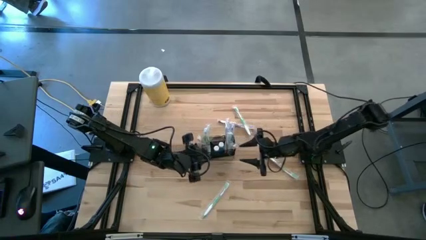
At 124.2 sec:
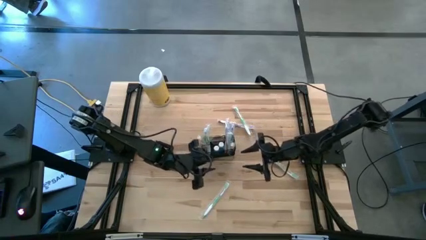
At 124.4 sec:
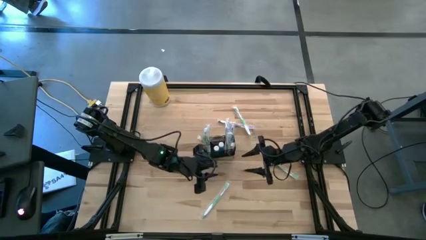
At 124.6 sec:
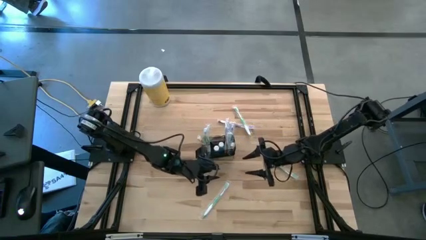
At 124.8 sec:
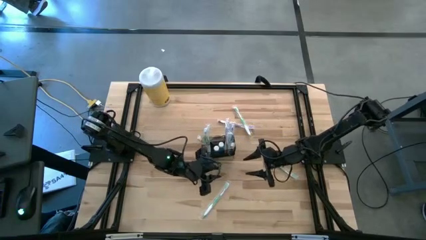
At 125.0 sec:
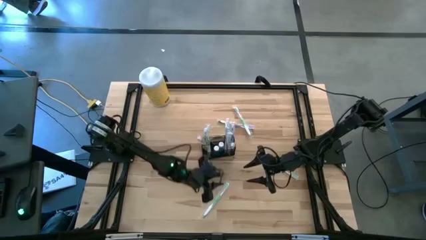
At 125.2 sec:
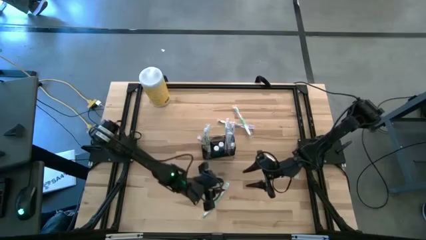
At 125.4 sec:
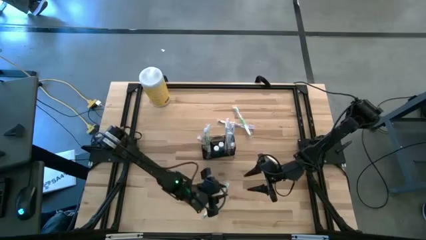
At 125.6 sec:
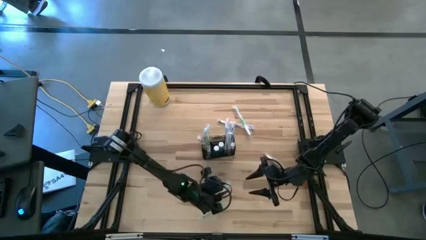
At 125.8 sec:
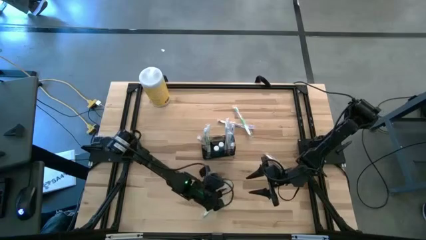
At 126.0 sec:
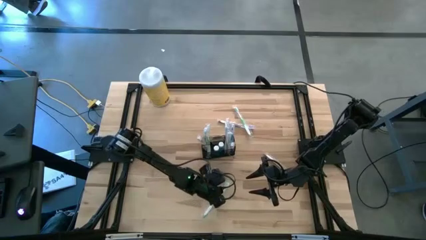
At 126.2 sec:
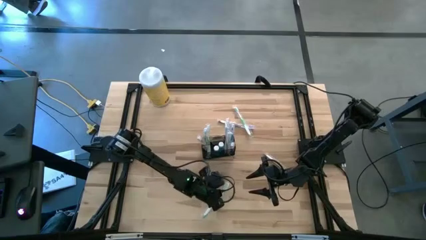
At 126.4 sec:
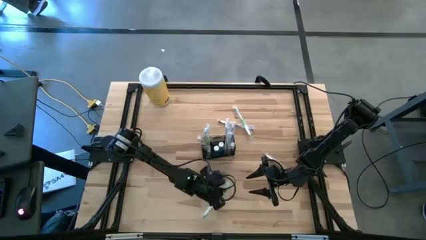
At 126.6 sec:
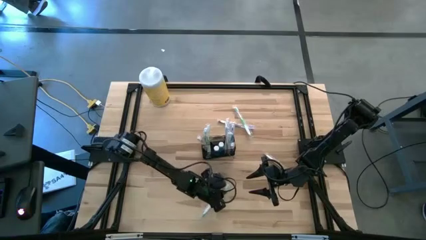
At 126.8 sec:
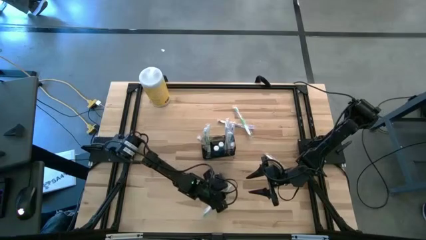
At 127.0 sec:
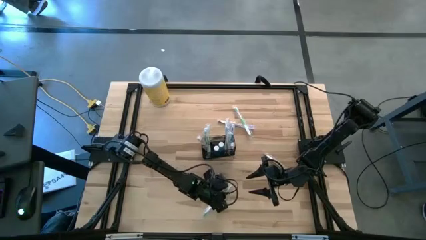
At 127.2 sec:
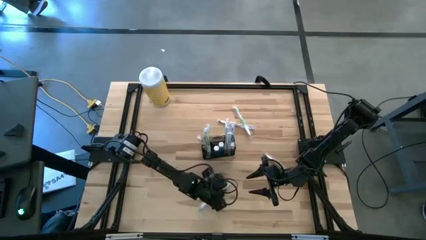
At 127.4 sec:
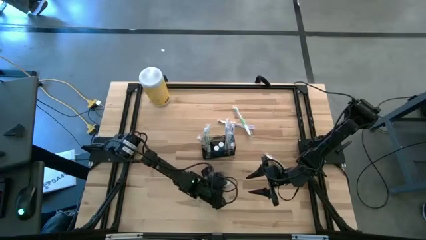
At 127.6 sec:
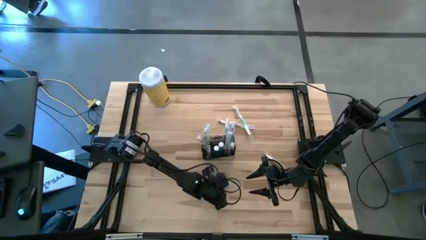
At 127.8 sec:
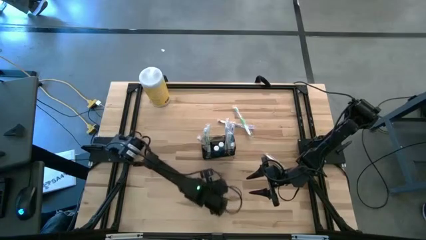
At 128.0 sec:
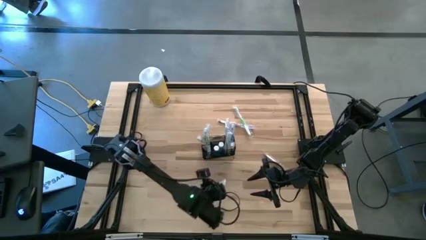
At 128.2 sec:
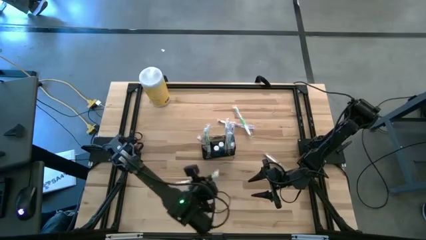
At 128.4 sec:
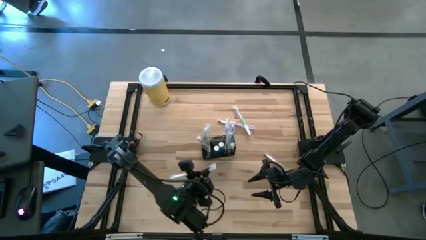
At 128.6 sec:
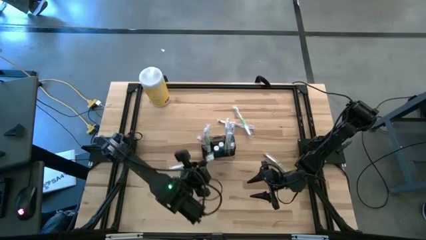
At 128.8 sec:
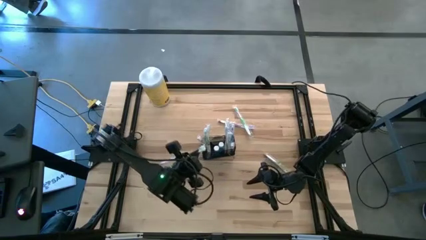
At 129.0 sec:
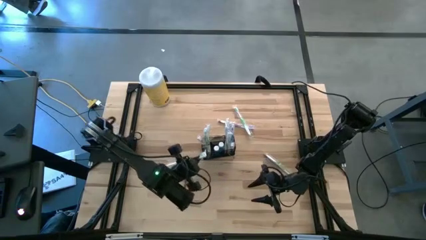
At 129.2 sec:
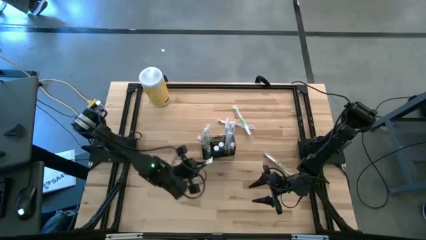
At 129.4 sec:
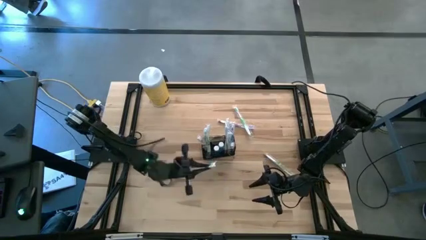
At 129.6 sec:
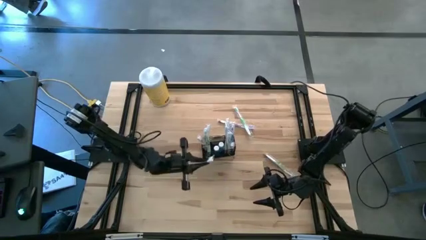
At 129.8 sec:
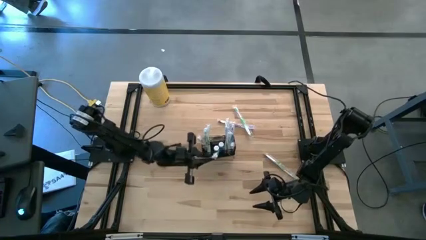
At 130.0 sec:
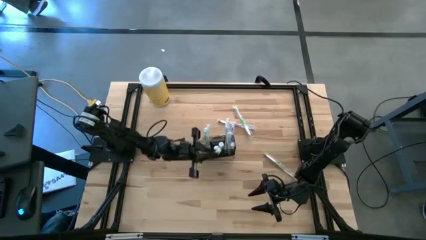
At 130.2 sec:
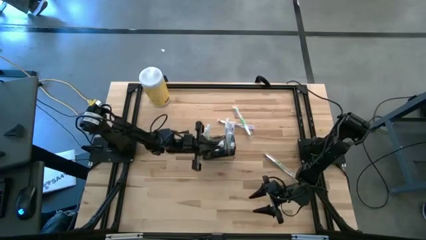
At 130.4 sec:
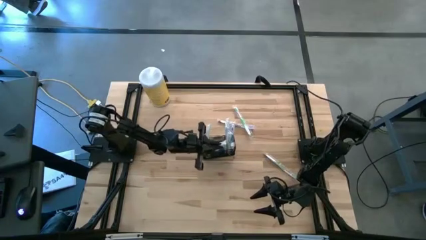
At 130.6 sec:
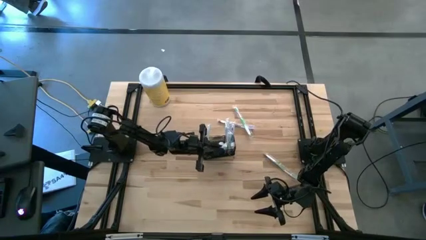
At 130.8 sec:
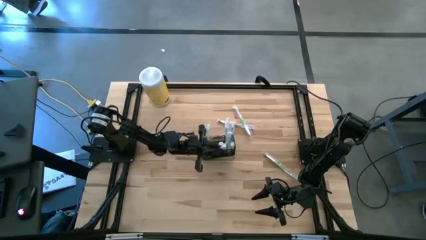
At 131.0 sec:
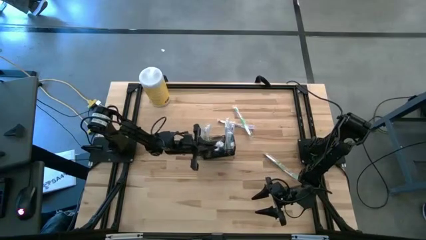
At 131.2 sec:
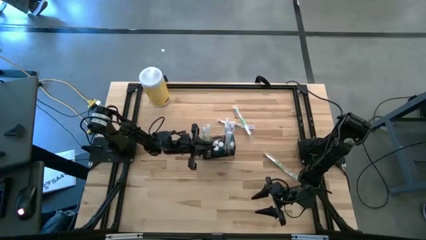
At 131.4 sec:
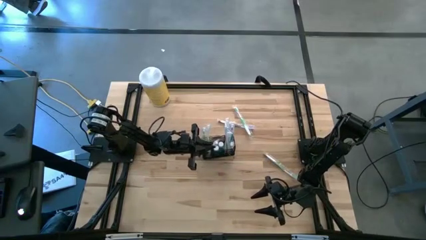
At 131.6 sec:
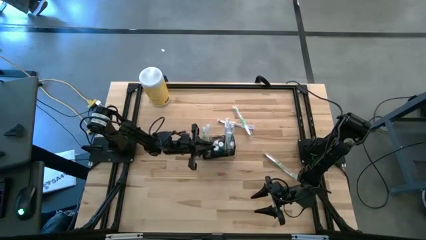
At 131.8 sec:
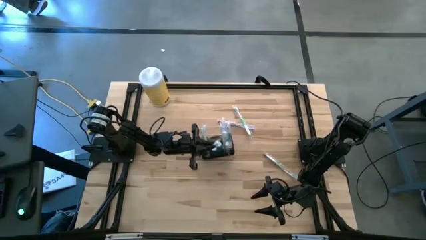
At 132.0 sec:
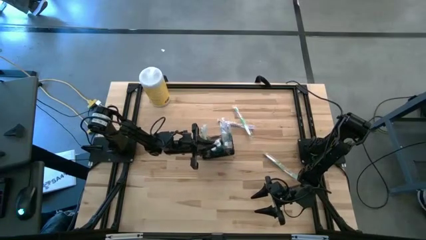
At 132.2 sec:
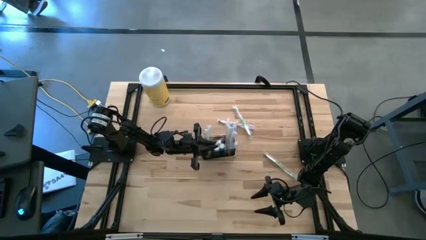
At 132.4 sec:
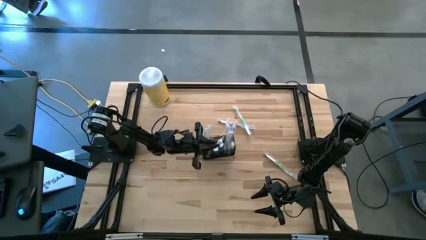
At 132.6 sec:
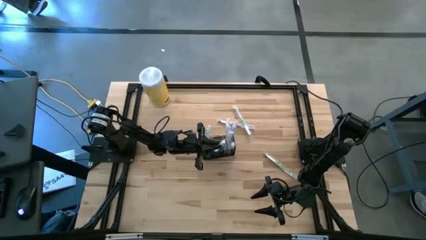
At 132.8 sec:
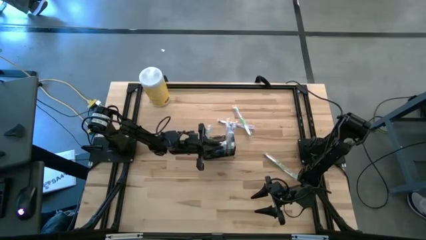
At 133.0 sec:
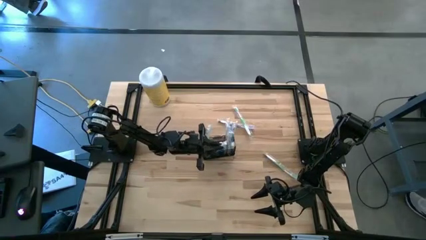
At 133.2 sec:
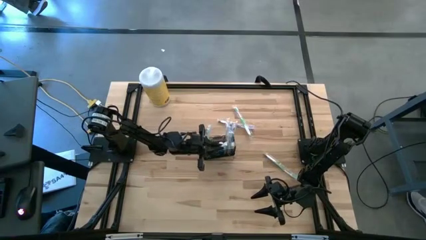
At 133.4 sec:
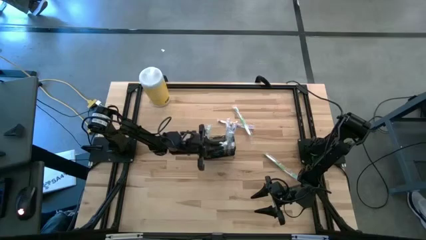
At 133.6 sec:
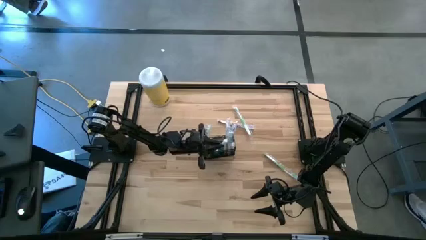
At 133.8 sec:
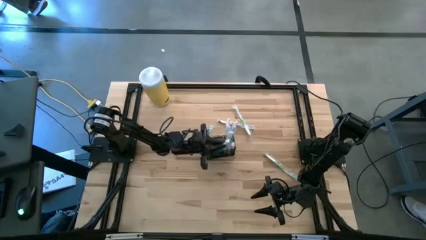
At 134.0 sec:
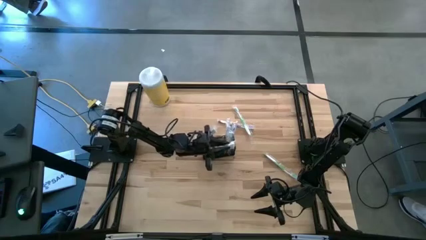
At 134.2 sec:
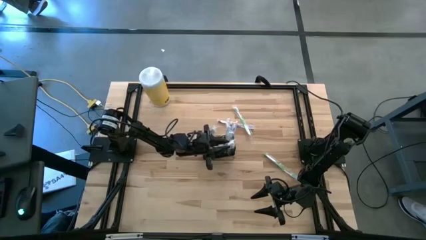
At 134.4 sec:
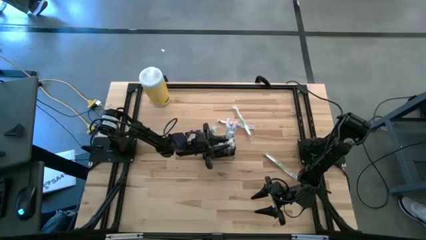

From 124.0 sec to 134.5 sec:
Task: Pick & Place toothbrushing station
Put the green toothbrush into the wire organizer

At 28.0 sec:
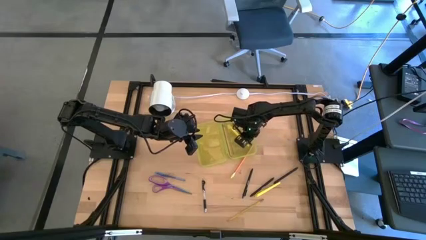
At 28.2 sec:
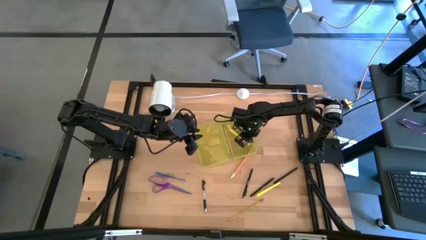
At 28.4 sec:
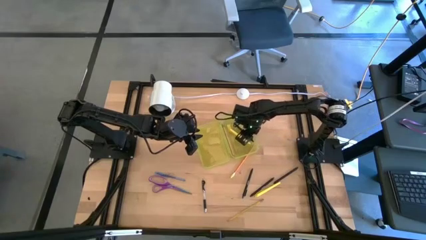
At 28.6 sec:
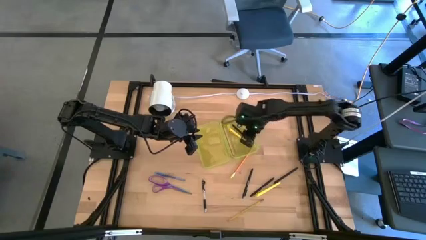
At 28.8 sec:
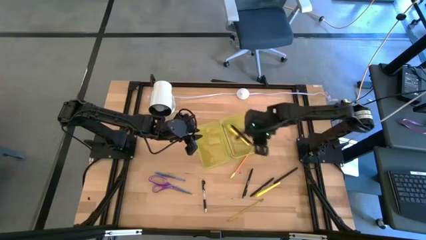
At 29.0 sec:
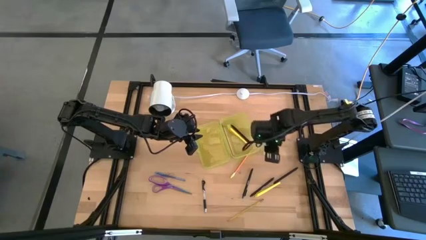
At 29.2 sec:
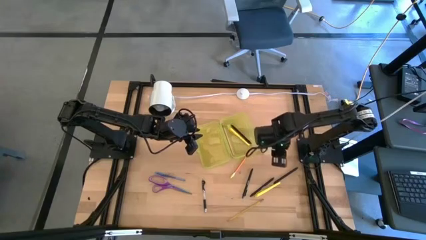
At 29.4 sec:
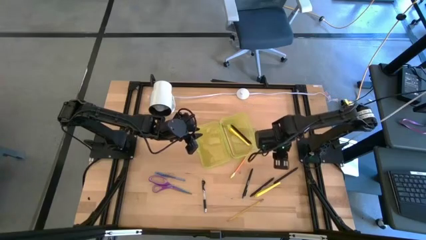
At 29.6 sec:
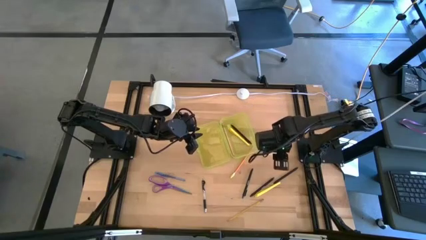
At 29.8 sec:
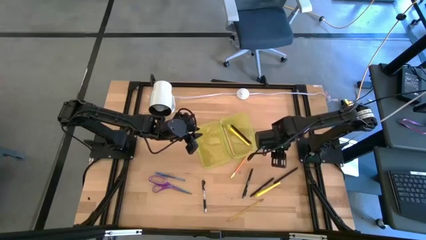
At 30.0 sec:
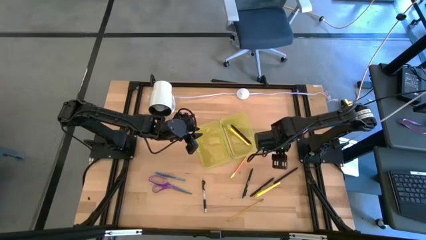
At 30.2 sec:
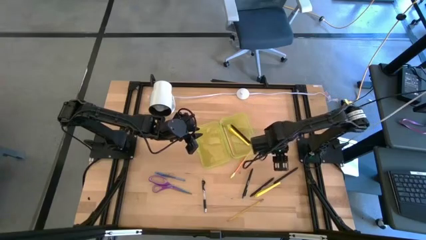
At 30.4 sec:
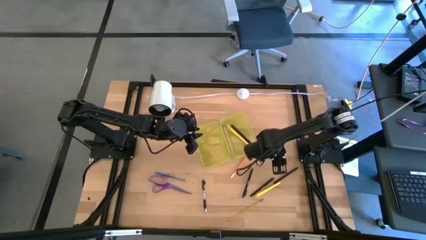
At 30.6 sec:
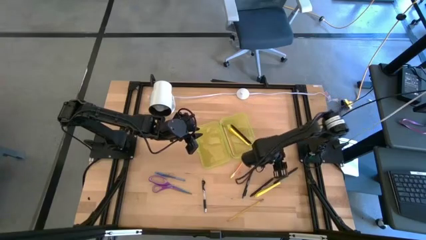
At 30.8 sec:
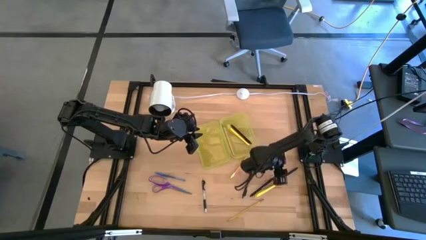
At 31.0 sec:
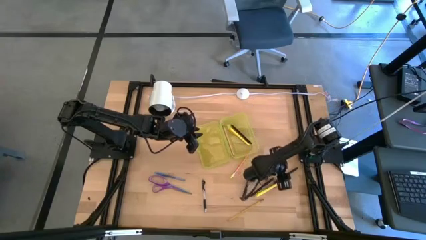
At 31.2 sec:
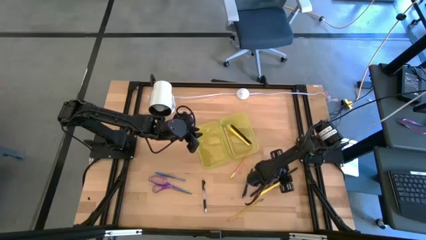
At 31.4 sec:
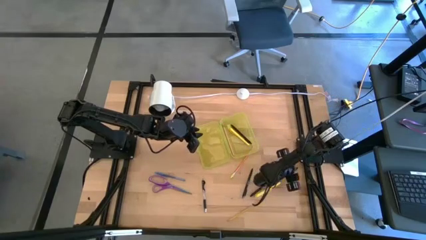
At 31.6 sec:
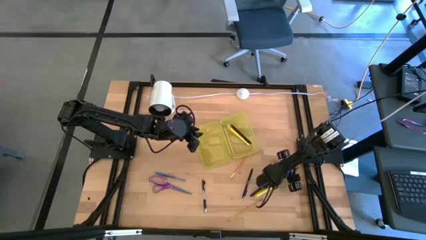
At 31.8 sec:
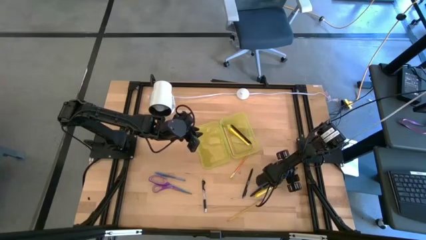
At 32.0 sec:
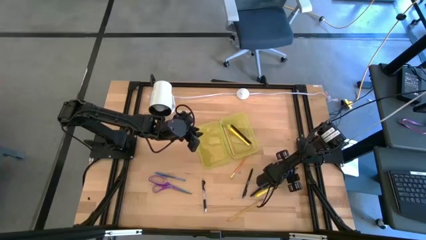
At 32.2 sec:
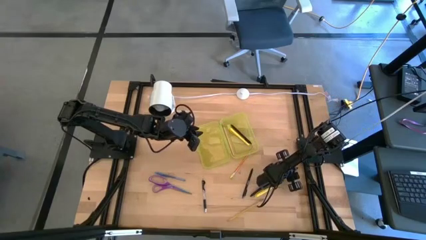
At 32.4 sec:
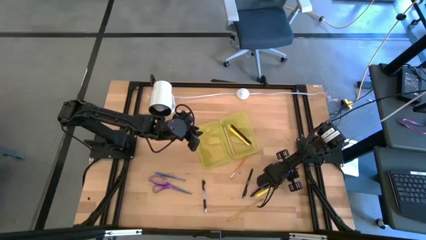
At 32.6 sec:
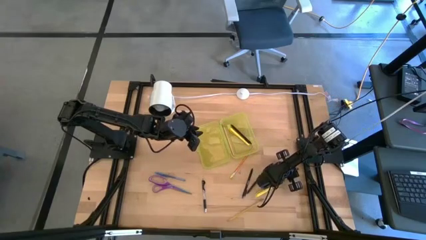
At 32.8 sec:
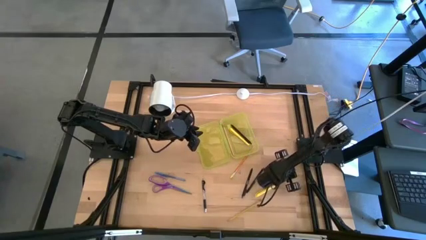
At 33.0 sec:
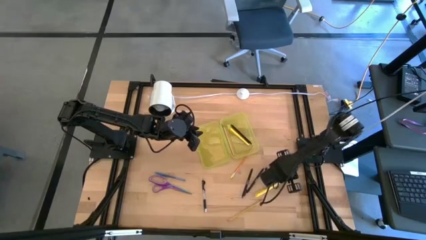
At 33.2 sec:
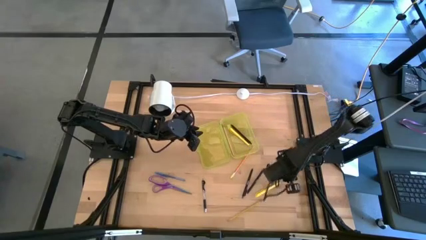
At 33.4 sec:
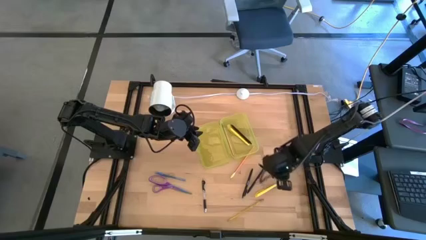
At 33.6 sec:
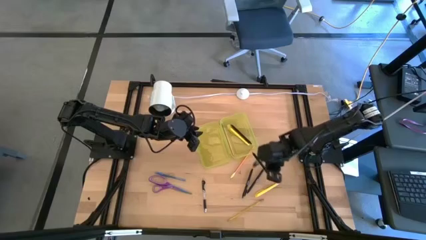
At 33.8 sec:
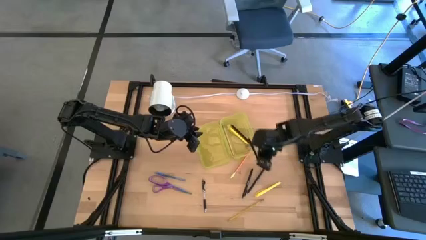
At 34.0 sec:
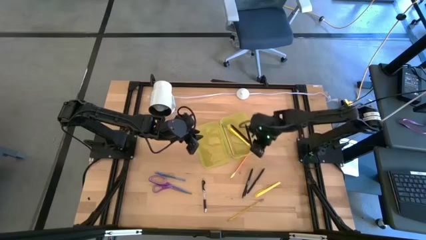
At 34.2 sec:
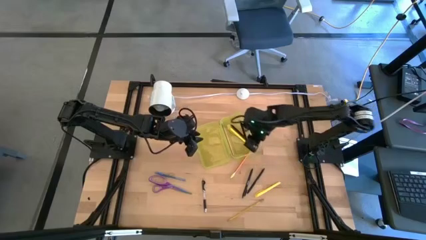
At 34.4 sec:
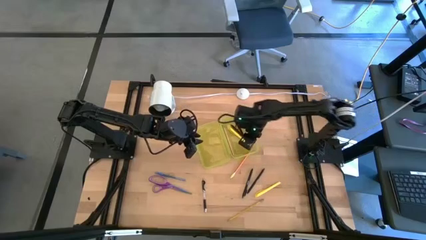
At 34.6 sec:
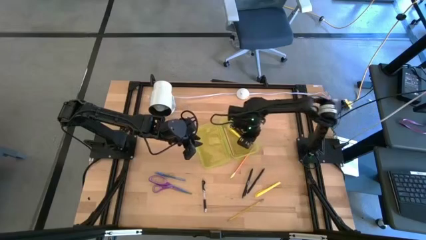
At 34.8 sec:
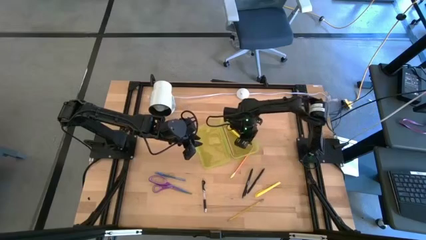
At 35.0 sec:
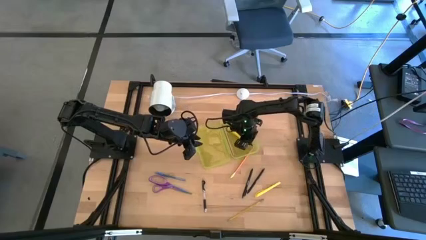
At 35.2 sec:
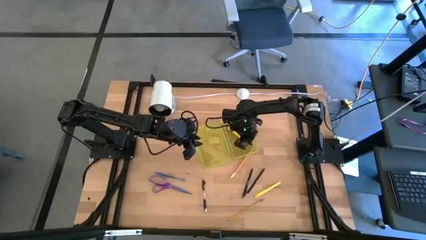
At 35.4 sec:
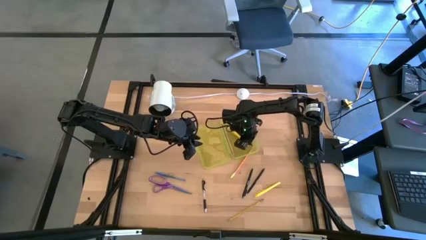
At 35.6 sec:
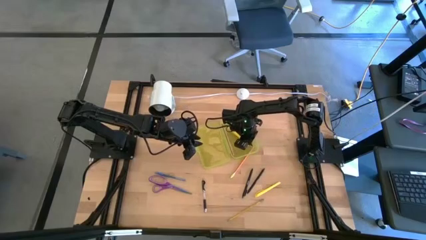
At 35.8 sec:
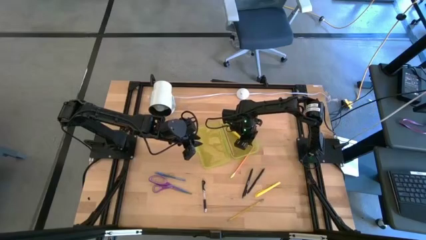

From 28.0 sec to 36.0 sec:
Task: Pick & place school supplies into a supply box
Put the black pen into the yellow supply box
